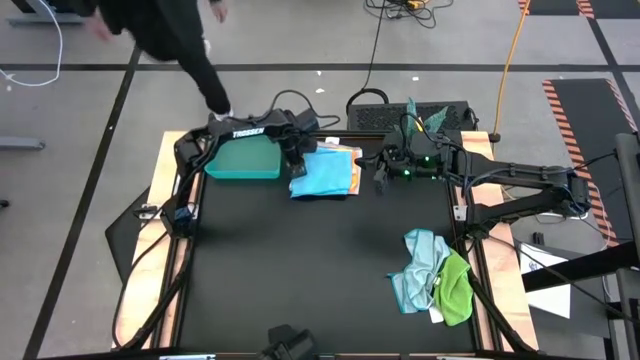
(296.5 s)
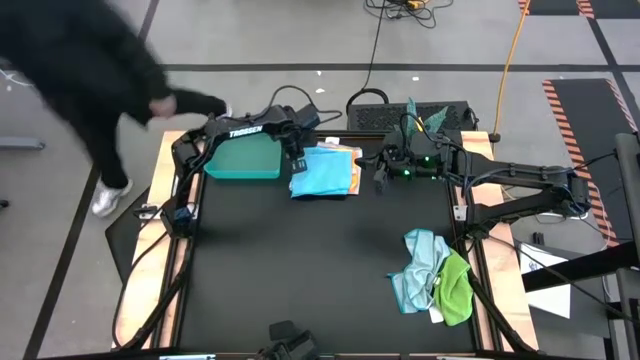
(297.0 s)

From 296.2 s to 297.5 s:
Task: Fold microfiber towels
Stack the folded blue microfiber towel on top of the folded gray microfiber towel

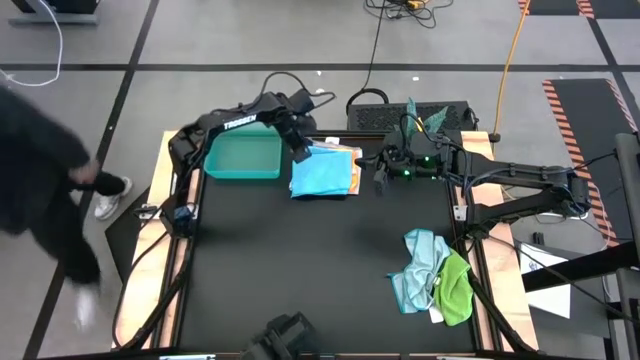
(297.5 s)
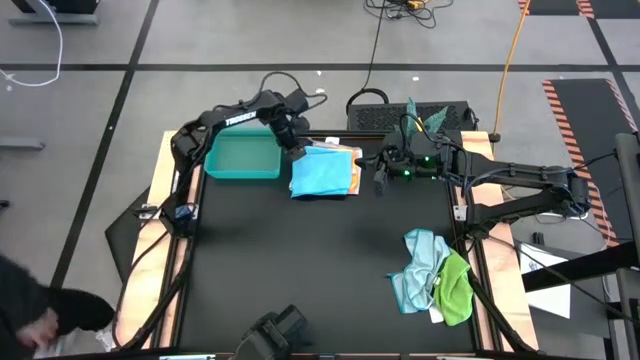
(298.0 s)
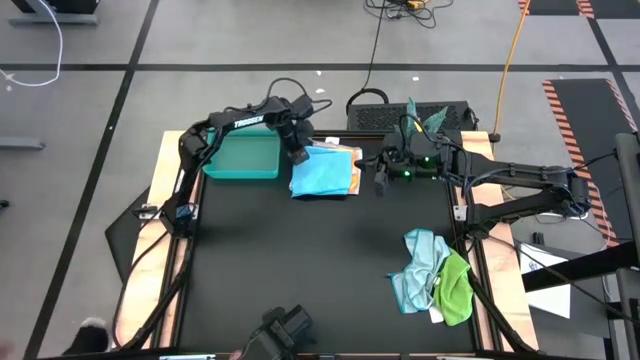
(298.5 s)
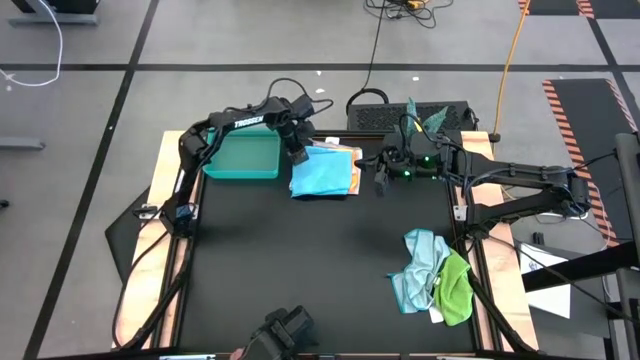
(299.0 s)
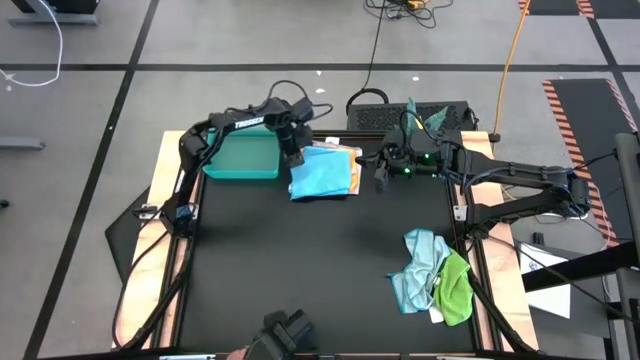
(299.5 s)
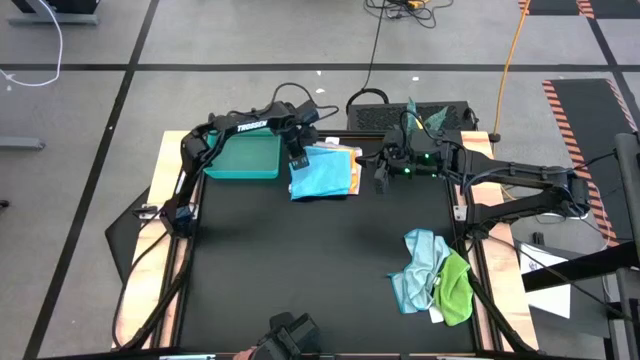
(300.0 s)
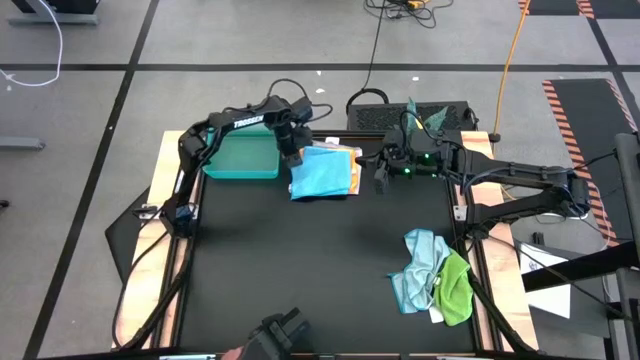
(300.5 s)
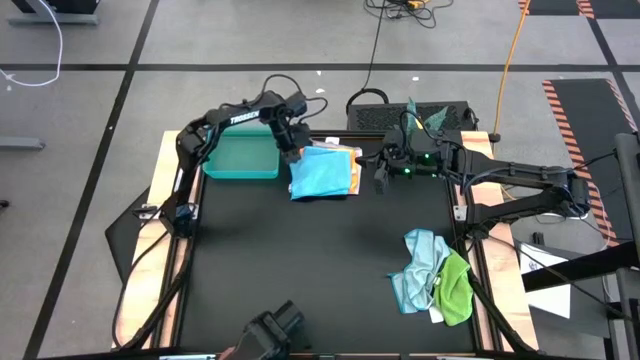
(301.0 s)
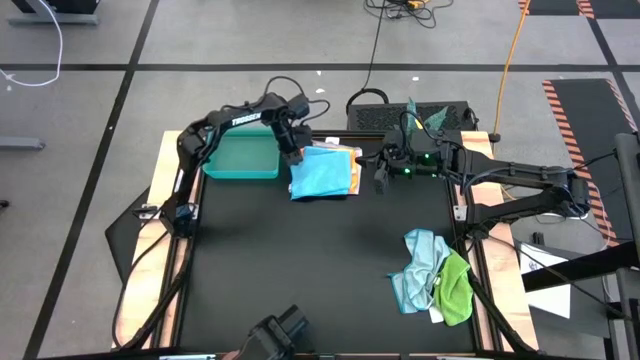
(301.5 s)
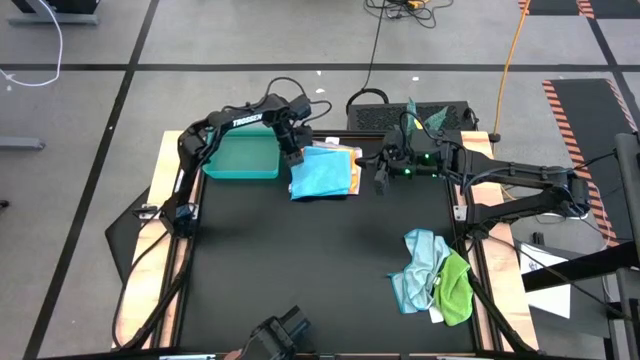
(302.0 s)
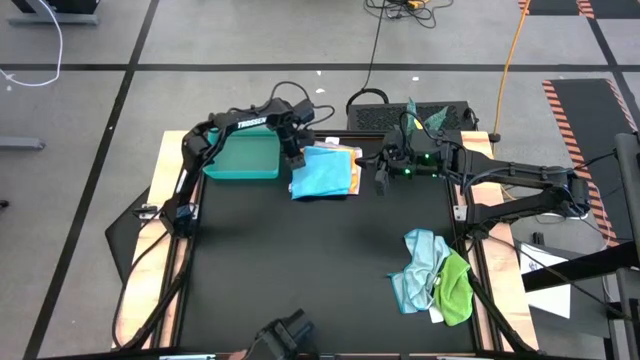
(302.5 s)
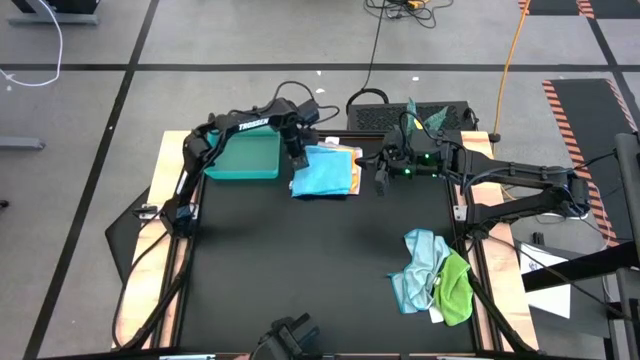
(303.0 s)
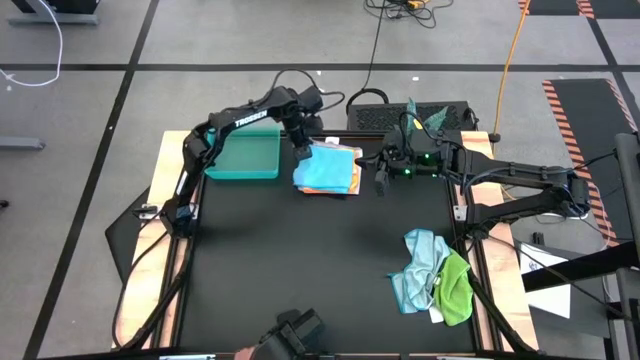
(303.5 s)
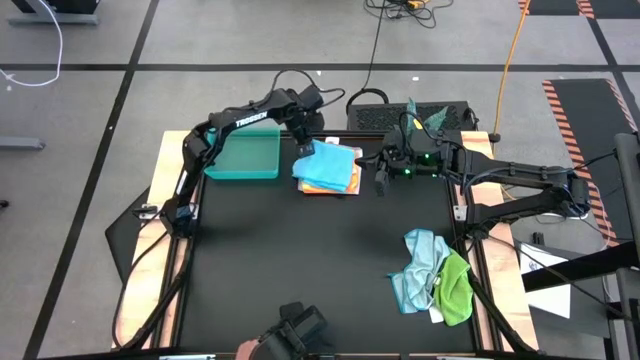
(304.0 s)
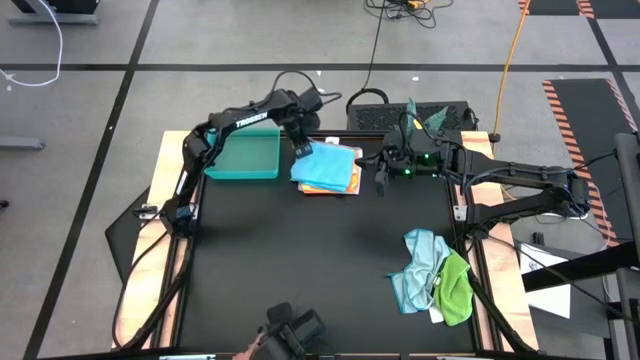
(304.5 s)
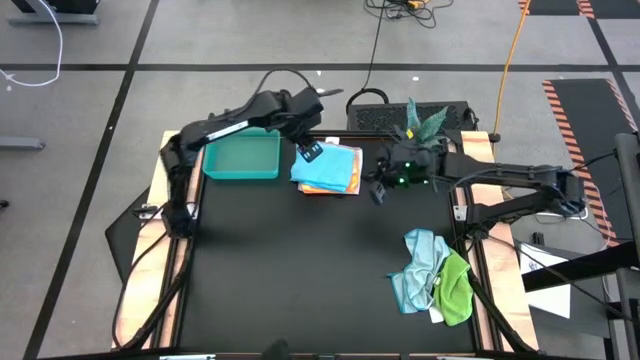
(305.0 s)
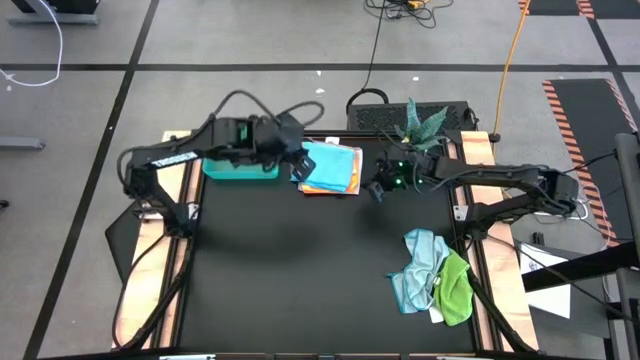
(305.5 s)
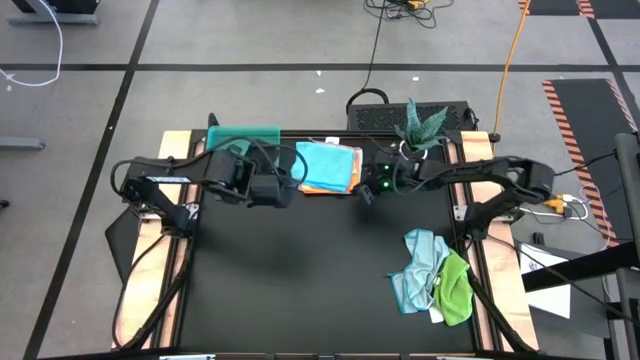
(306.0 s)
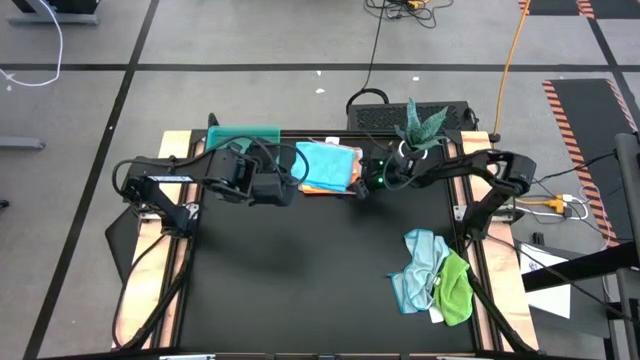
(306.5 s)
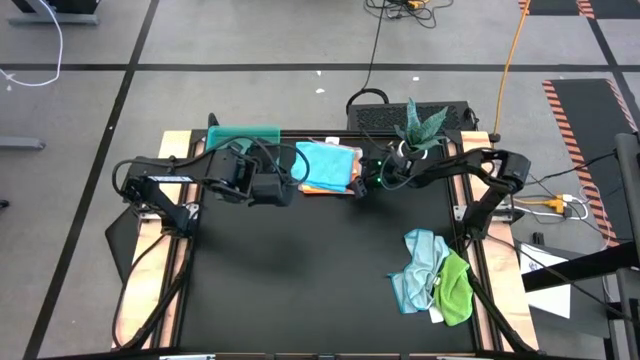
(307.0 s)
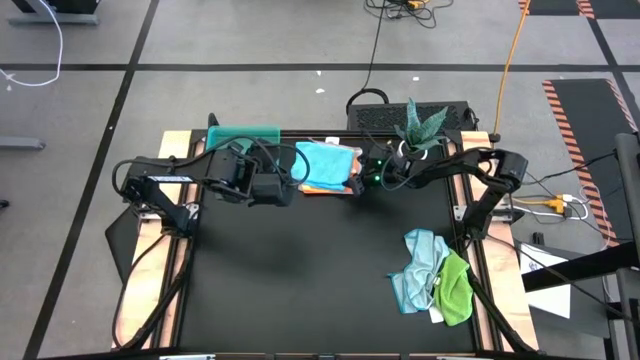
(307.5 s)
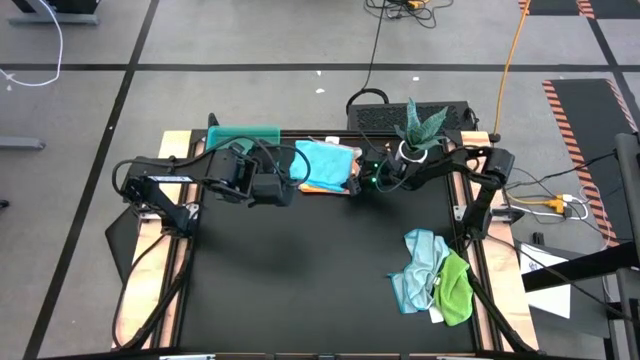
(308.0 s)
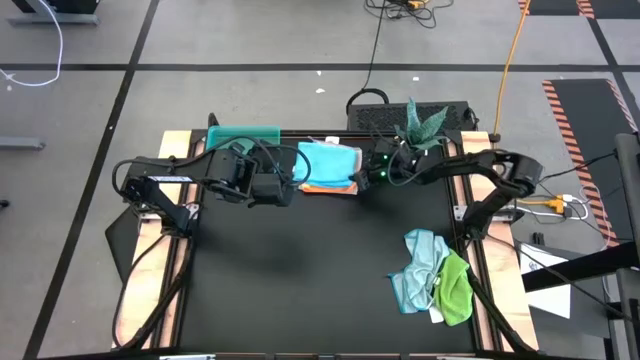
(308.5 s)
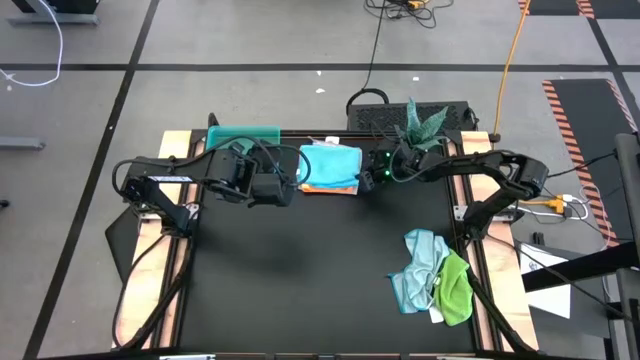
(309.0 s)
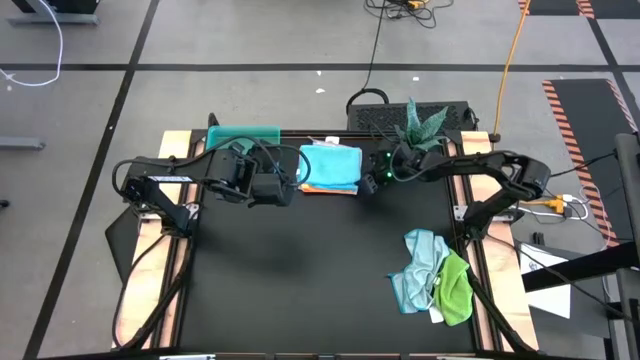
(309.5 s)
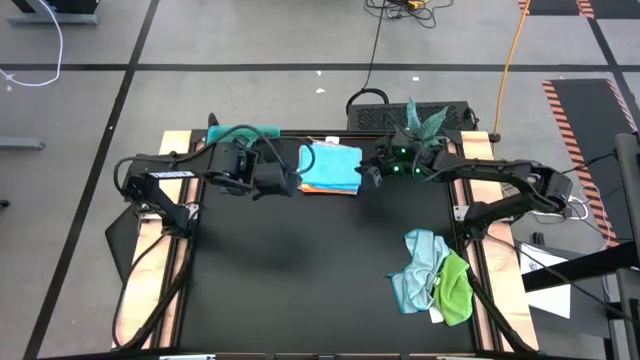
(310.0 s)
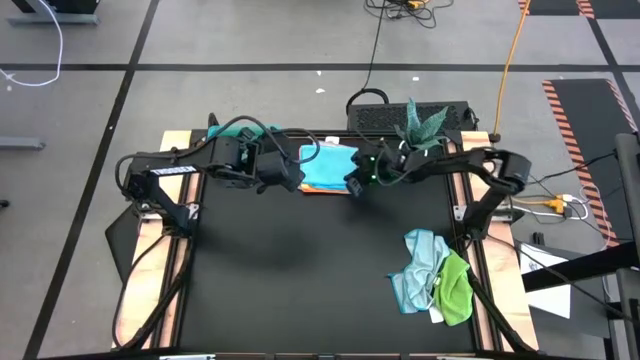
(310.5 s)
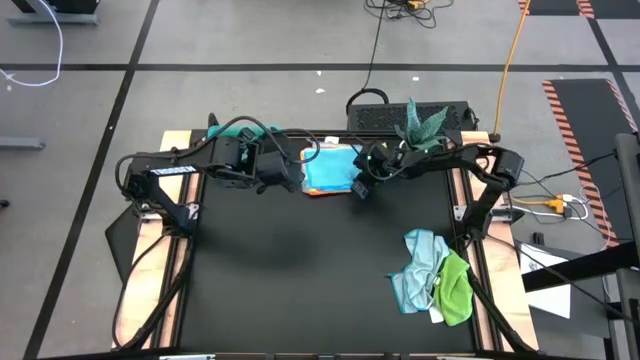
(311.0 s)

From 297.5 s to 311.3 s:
Stack the folded blue microfiber towel on top of the folded gray microfiber towel

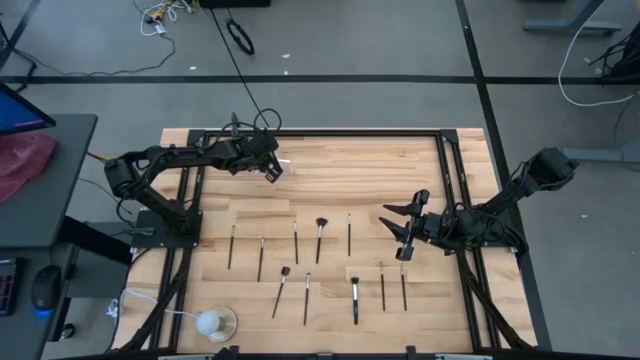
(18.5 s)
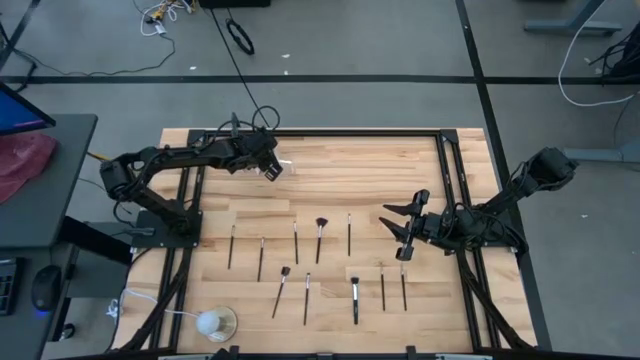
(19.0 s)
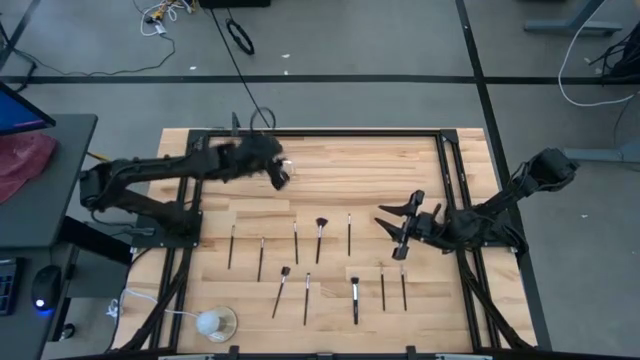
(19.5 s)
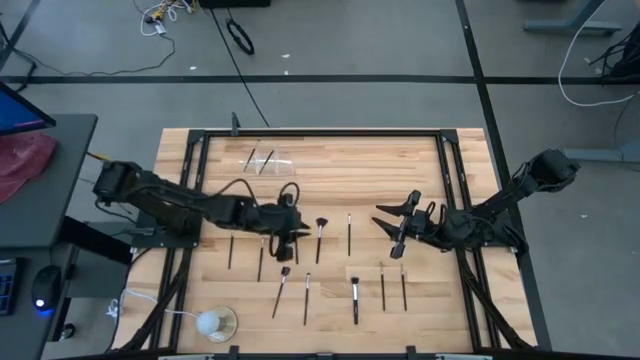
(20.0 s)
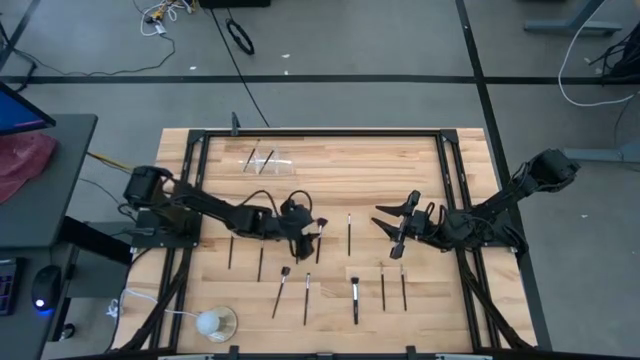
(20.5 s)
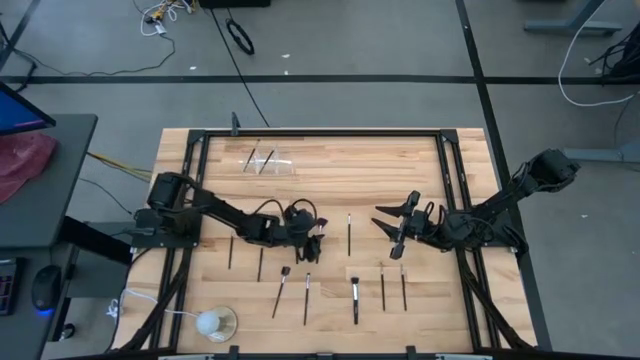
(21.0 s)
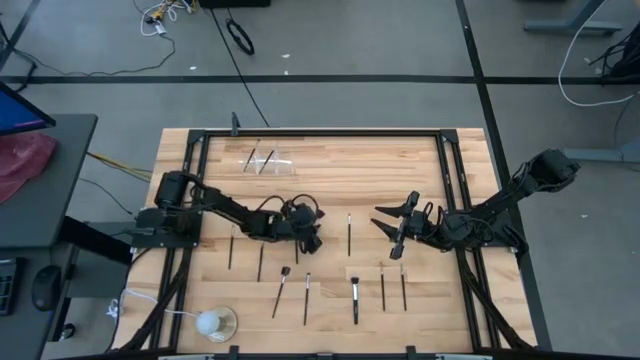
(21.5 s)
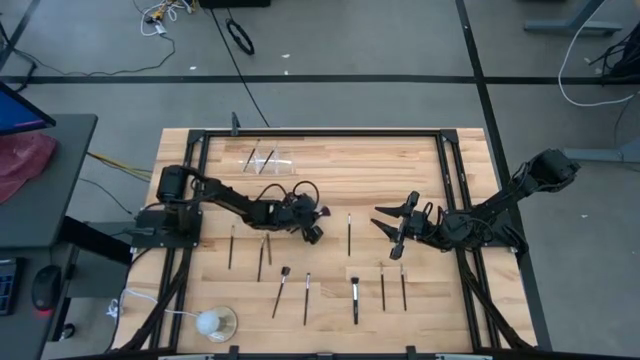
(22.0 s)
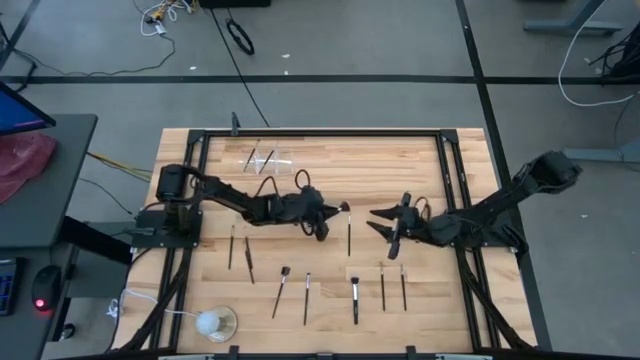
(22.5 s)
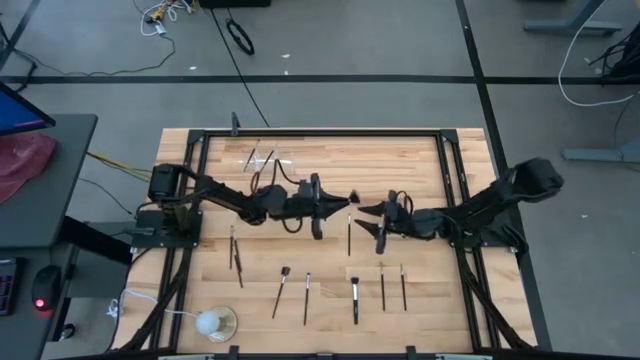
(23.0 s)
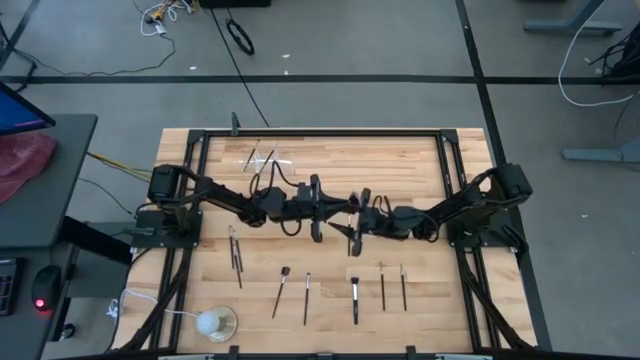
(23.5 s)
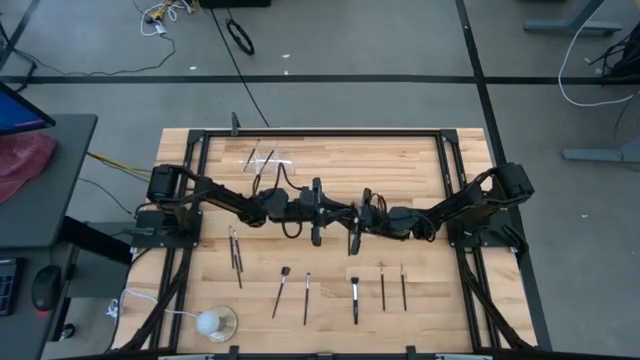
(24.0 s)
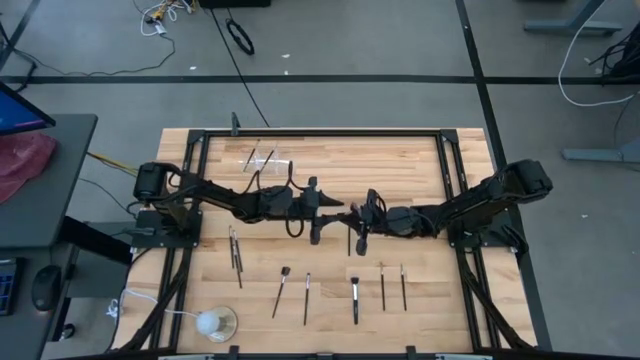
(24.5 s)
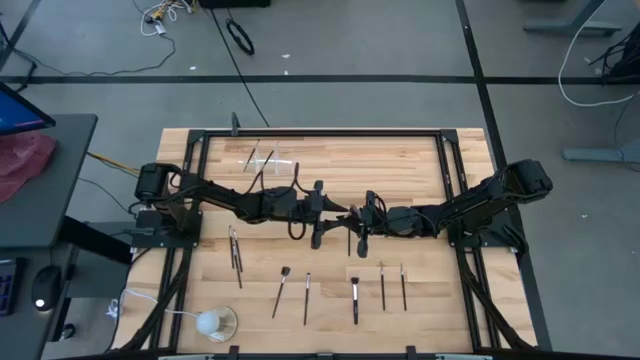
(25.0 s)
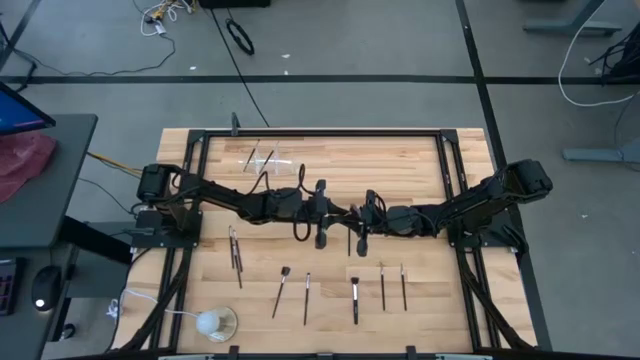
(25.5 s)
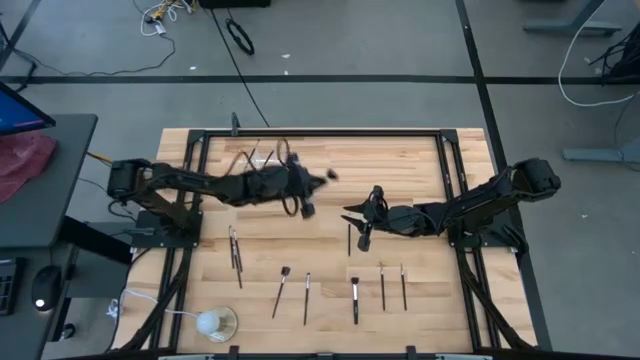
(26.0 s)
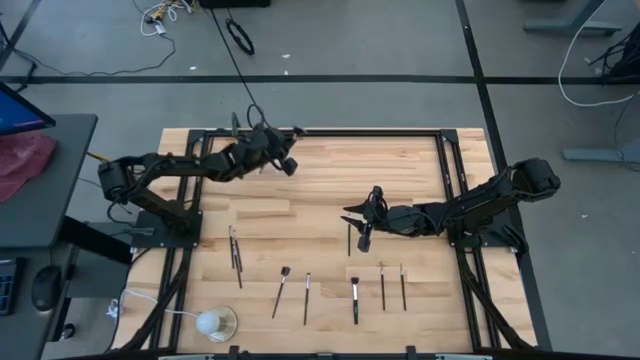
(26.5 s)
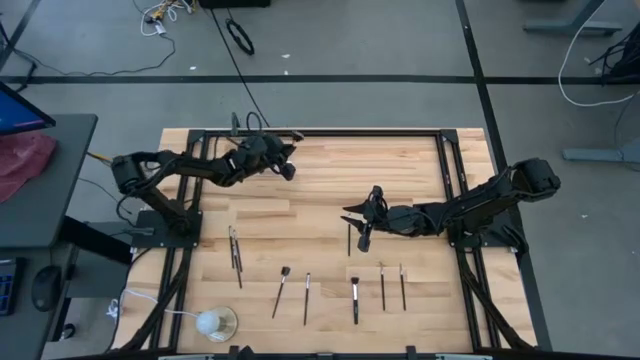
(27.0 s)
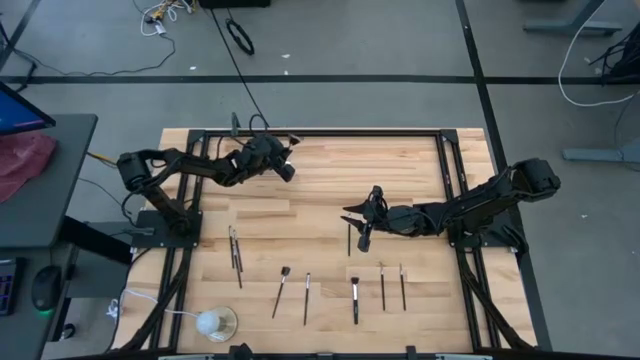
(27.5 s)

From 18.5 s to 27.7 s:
Task: Put items in baskets/containers
Put the highlighter brush into the right section of the transparent organizer
